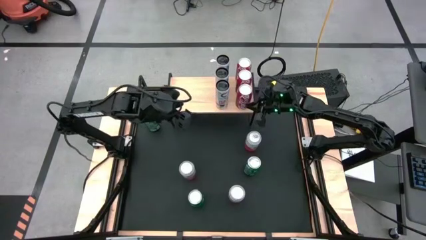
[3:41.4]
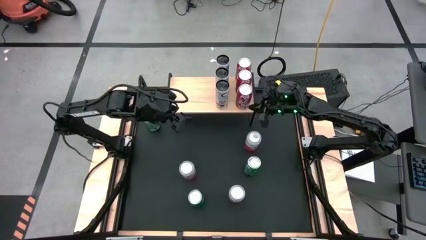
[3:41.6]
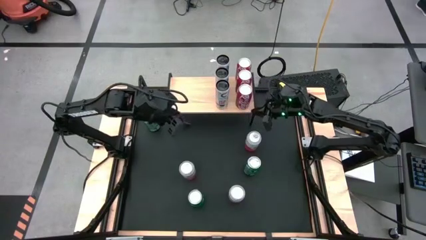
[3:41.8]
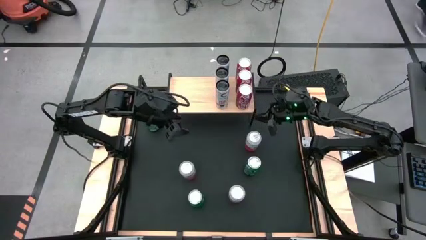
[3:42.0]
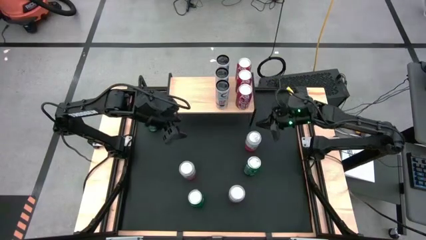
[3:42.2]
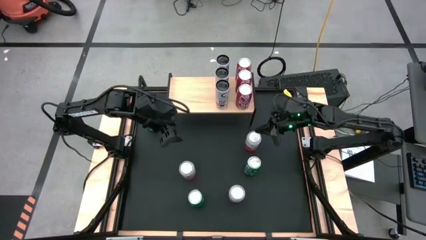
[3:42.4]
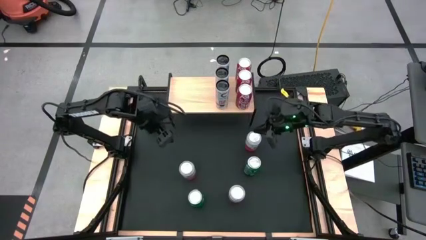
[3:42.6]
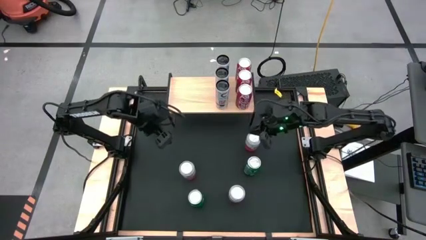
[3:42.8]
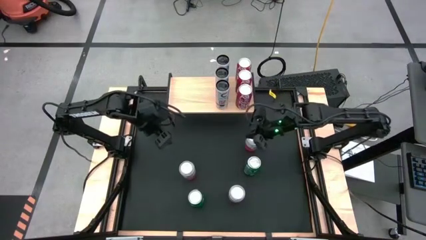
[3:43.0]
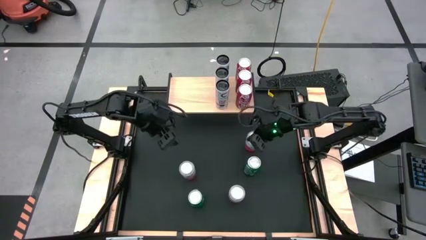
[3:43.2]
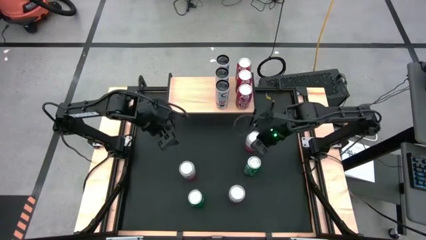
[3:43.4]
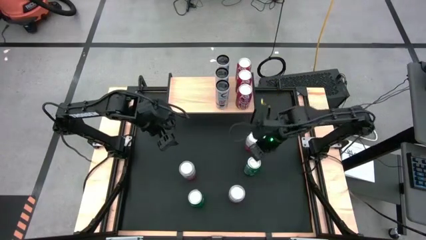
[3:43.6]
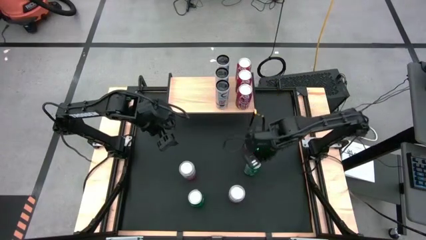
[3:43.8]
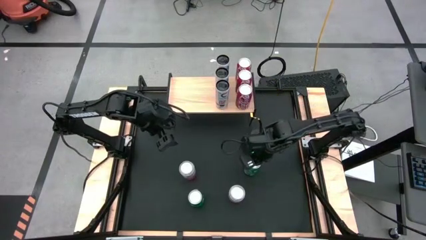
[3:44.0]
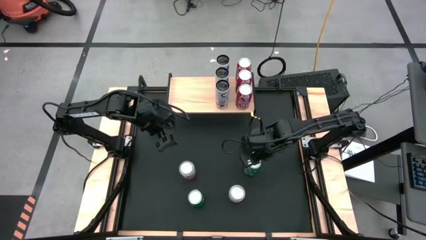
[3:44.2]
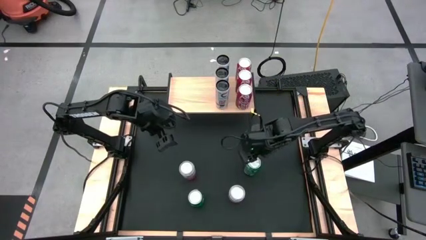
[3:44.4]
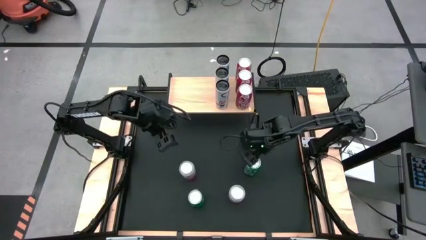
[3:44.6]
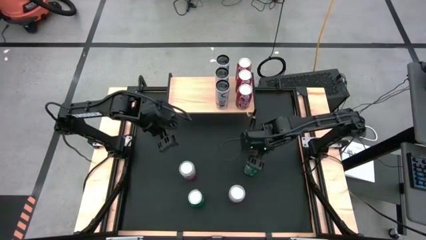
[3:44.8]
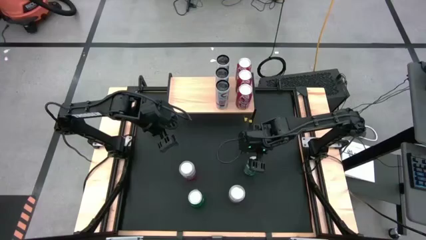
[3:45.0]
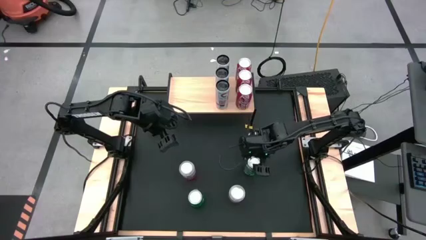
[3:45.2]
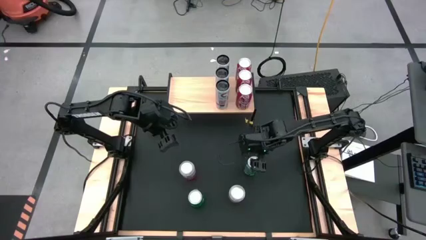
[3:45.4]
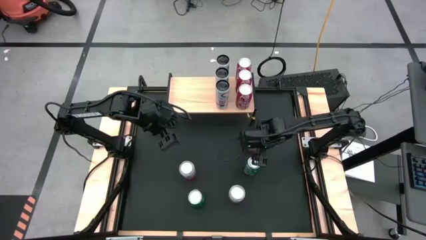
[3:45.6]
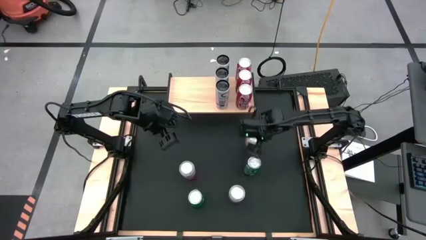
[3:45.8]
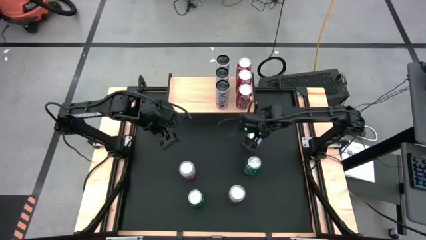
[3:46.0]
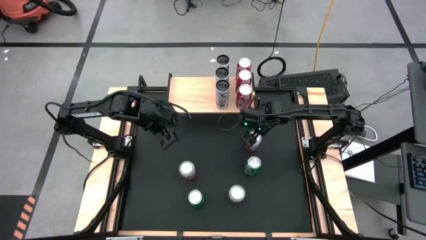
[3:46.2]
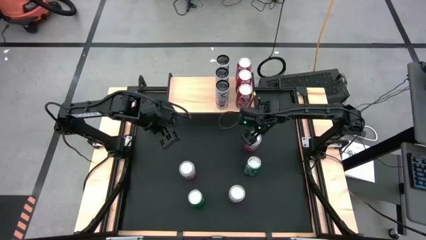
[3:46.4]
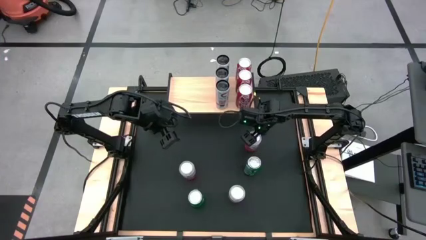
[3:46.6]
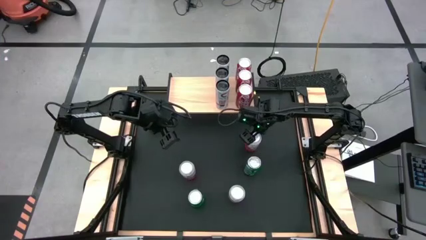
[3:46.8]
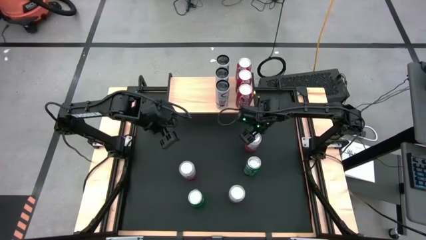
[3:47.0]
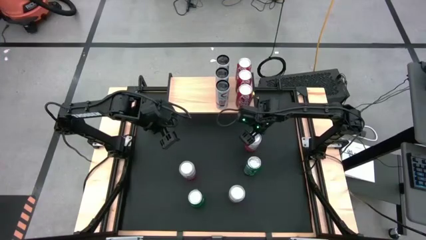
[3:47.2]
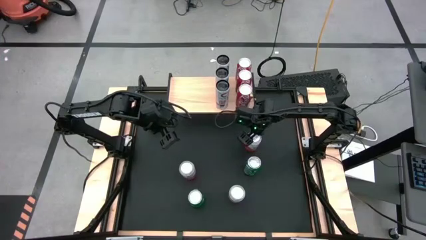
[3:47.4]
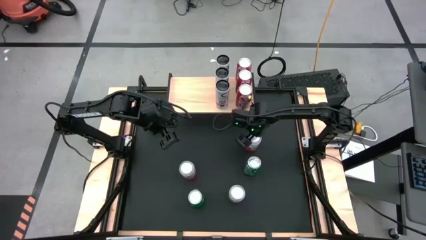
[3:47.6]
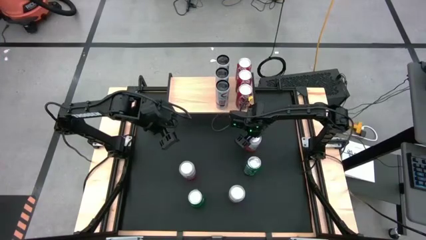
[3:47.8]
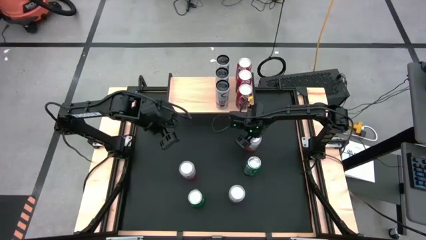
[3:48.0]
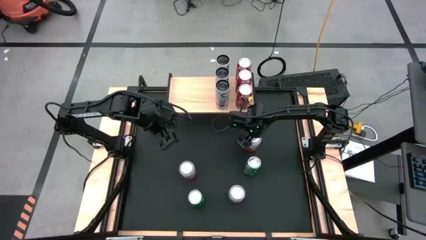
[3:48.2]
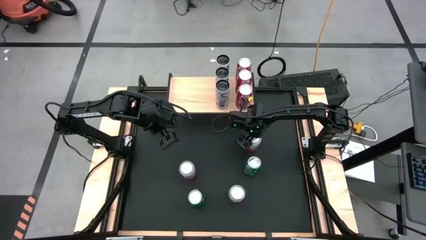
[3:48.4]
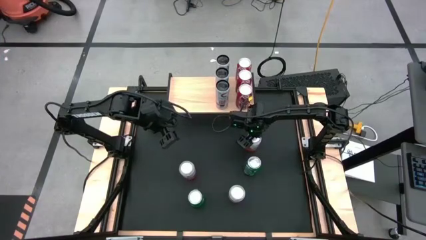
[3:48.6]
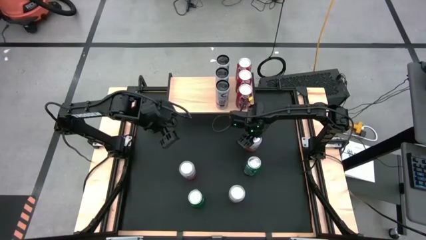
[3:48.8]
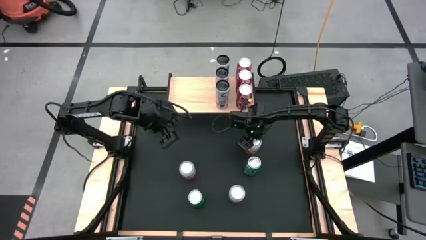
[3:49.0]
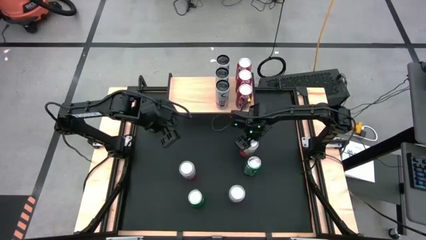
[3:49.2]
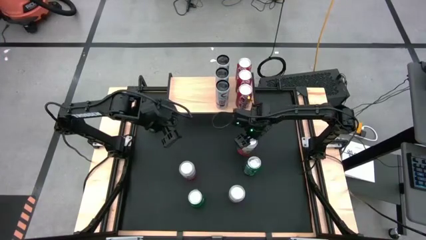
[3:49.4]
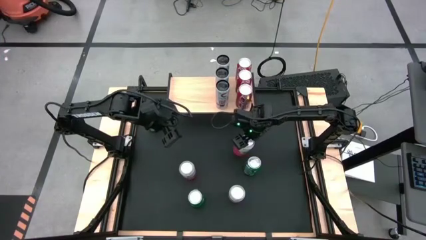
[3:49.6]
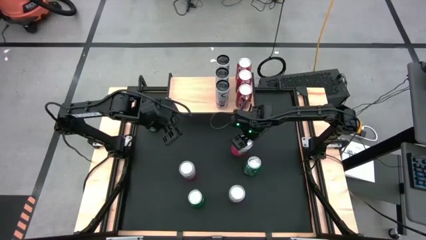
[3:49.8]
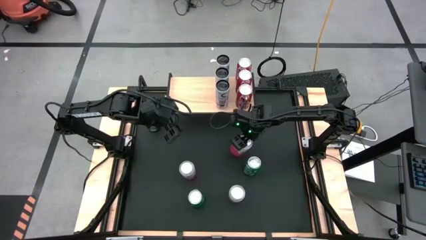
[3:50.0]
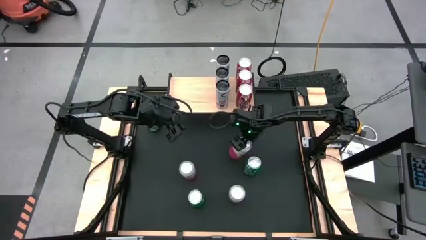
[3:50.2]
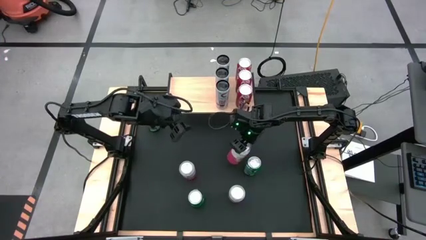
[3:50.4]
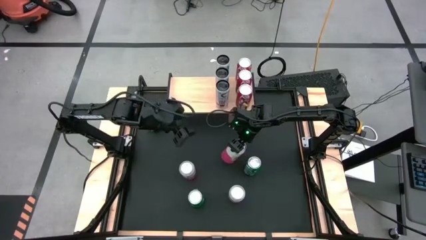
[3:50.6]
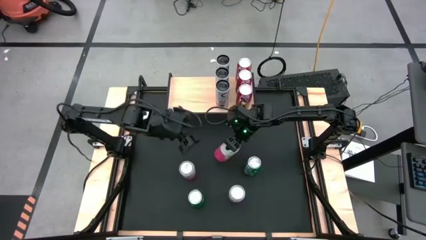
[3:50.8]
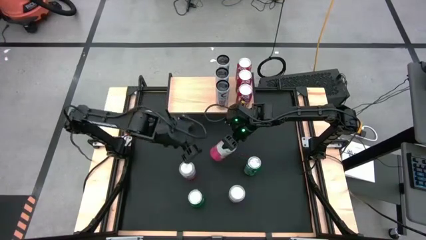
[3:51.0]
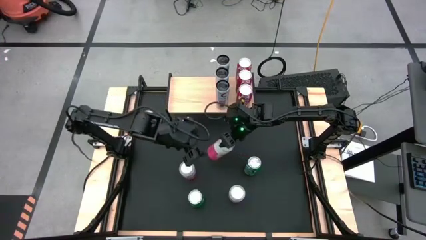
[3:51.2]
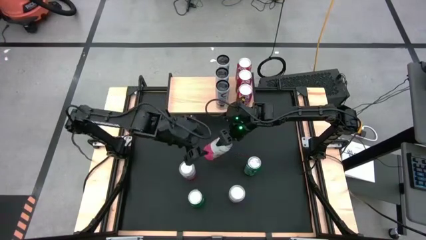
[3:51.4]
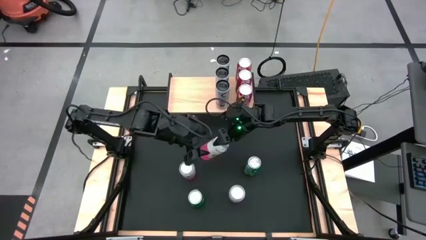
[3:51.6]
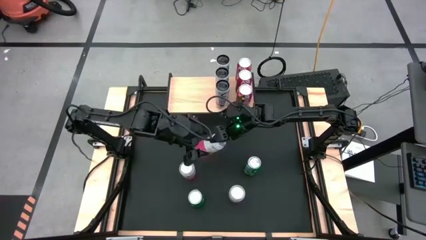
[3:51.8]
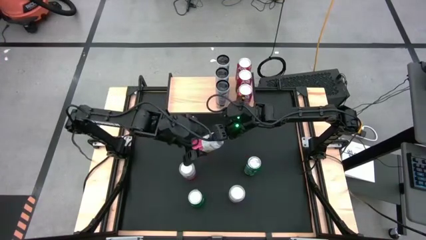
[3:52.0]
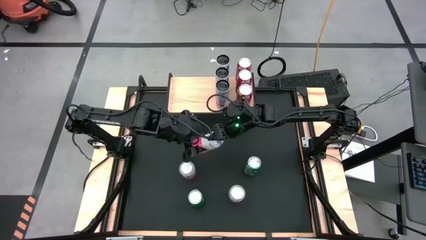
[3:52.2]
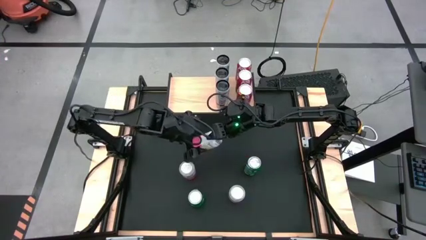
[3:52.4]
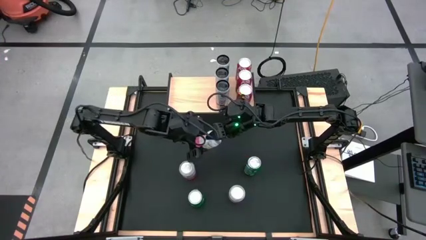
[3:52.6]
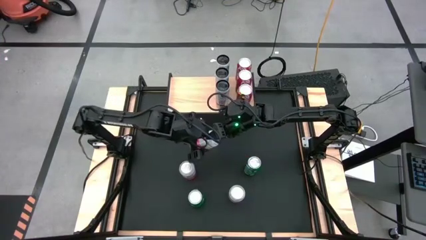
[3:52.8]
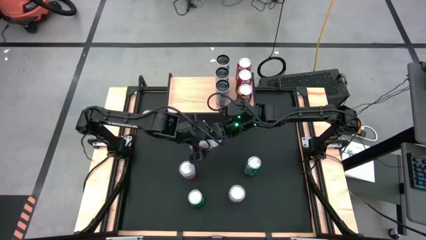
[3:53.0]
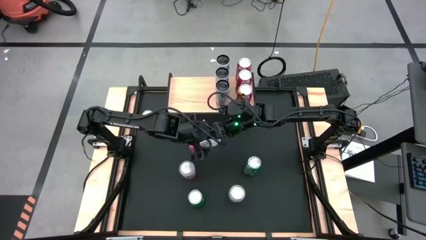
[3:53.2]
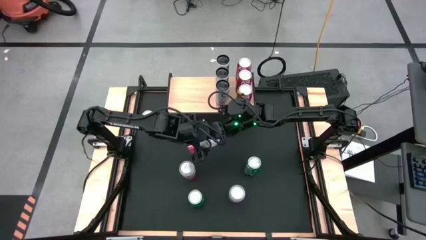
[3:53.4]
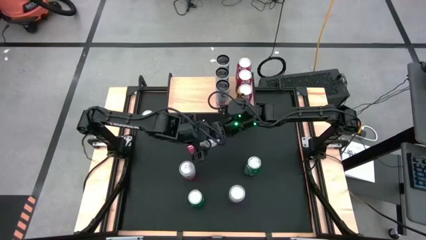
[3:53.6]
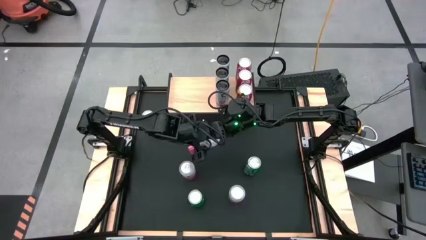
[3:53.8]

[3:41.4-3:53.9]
Task: Place canned beverage on shelf
Put the top pink white soda can on the shelf
